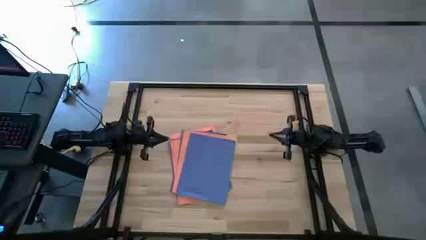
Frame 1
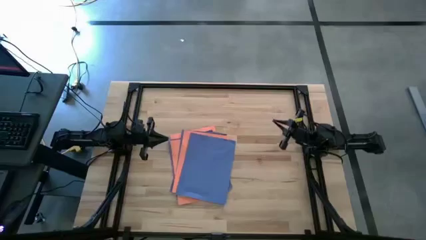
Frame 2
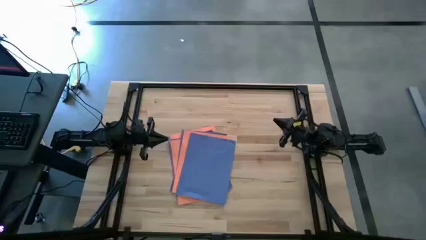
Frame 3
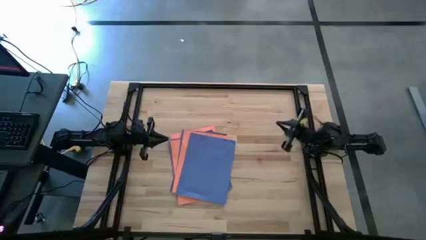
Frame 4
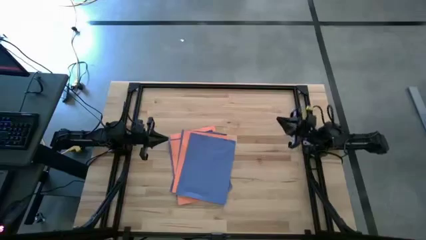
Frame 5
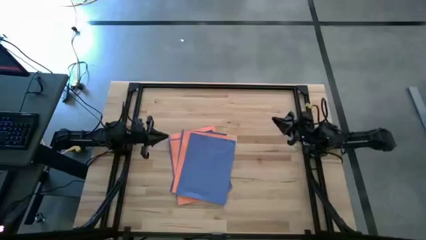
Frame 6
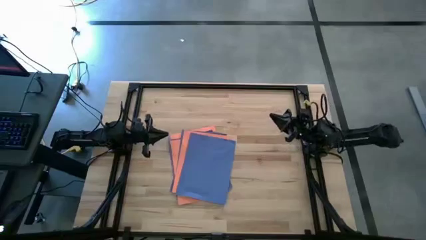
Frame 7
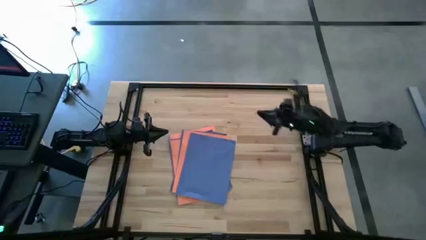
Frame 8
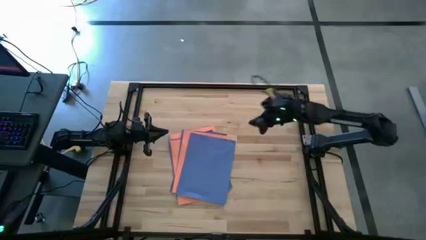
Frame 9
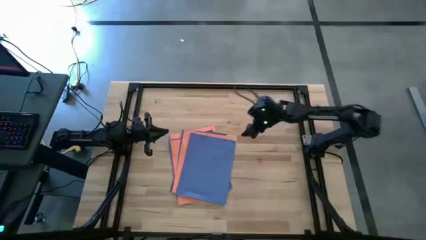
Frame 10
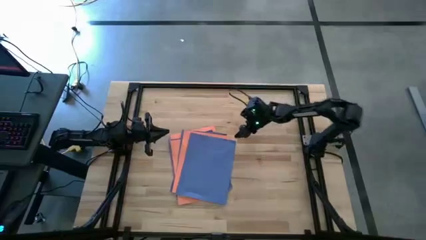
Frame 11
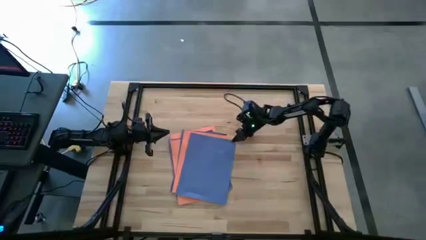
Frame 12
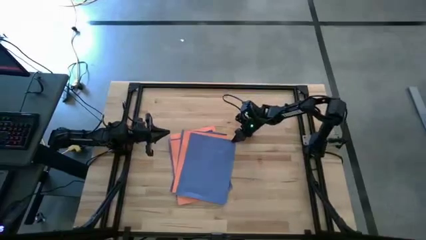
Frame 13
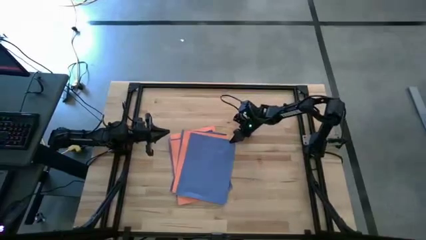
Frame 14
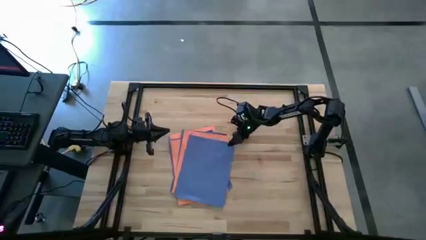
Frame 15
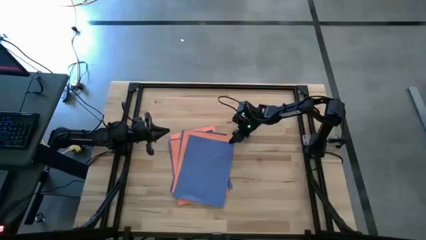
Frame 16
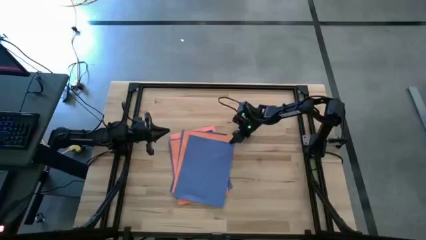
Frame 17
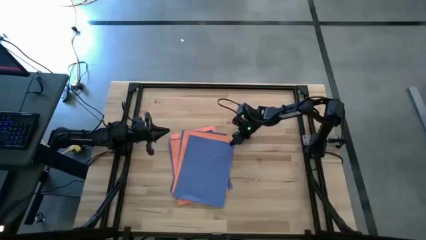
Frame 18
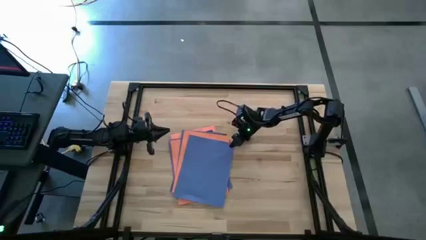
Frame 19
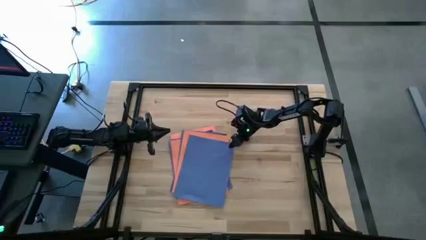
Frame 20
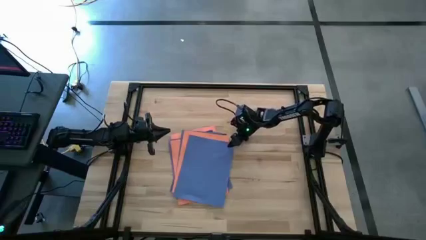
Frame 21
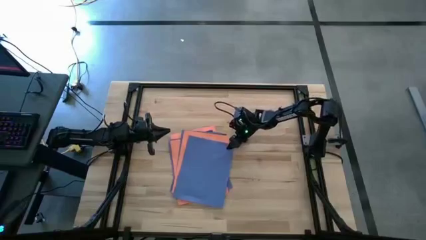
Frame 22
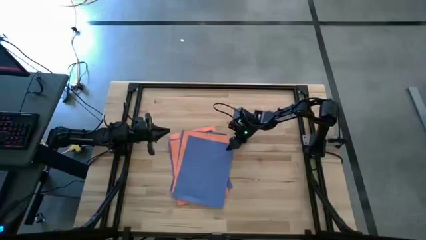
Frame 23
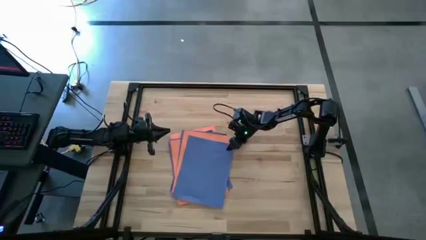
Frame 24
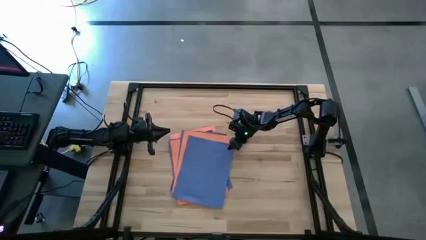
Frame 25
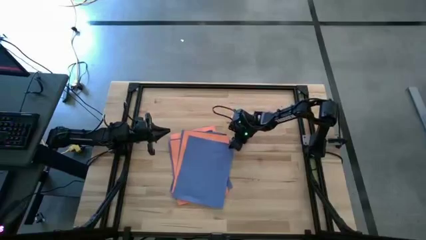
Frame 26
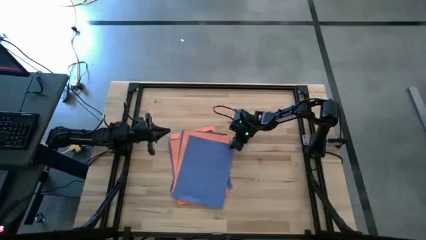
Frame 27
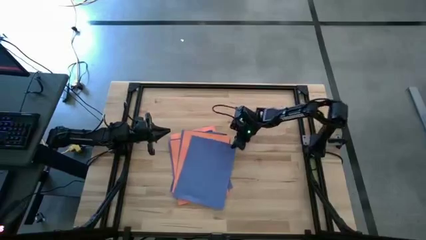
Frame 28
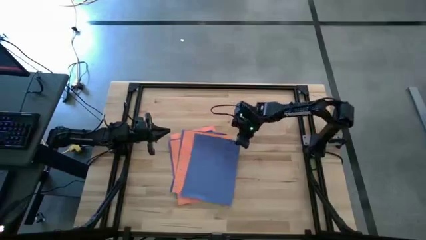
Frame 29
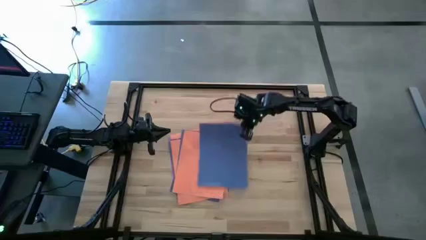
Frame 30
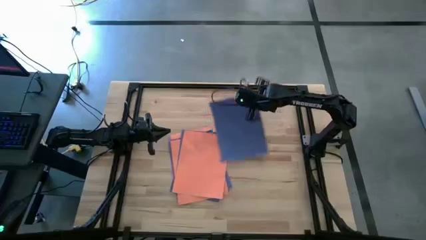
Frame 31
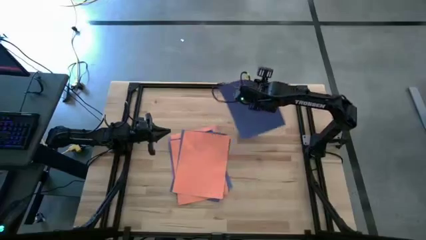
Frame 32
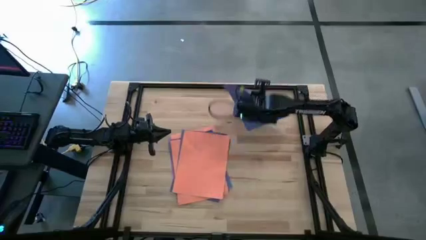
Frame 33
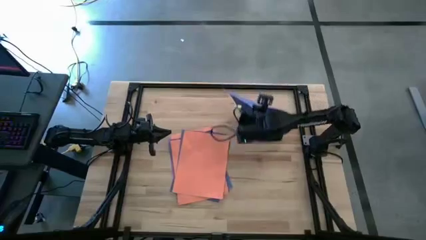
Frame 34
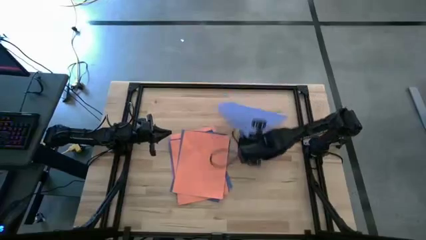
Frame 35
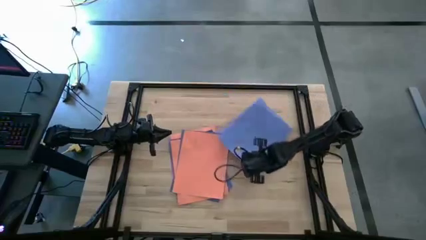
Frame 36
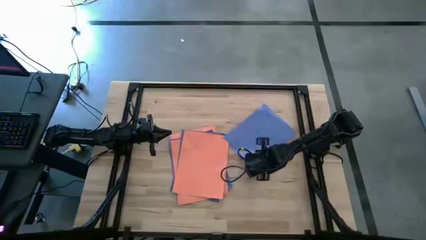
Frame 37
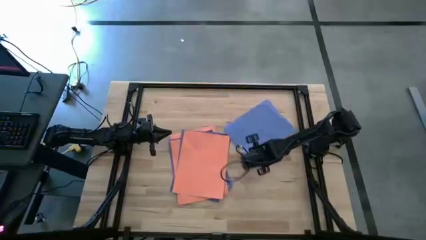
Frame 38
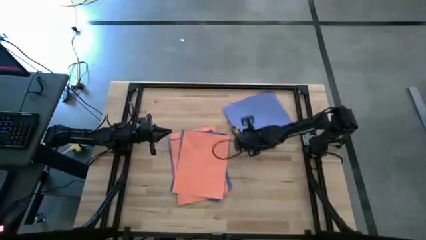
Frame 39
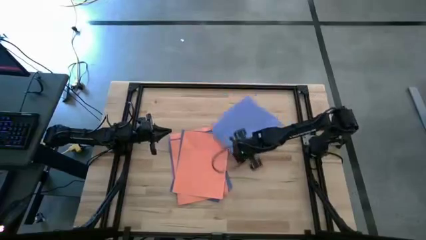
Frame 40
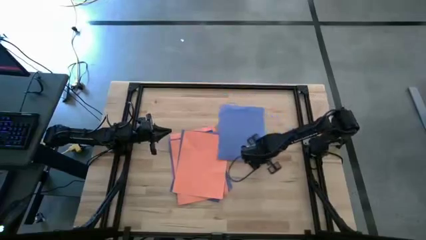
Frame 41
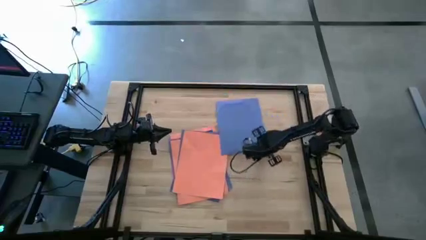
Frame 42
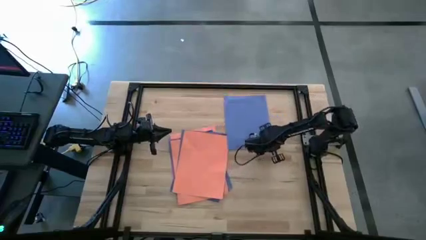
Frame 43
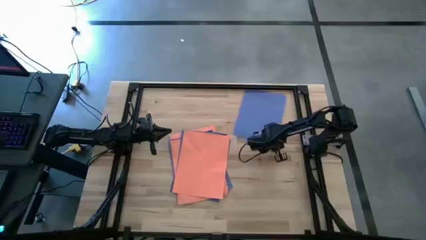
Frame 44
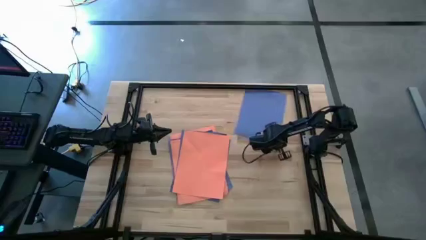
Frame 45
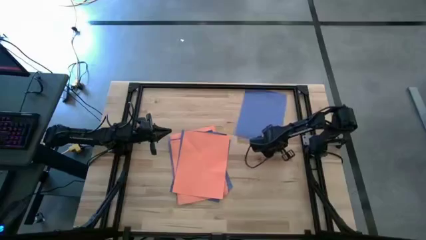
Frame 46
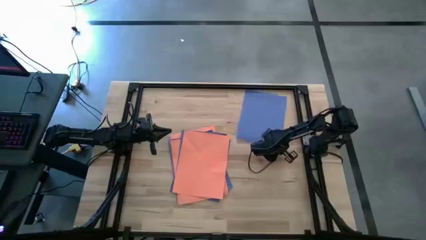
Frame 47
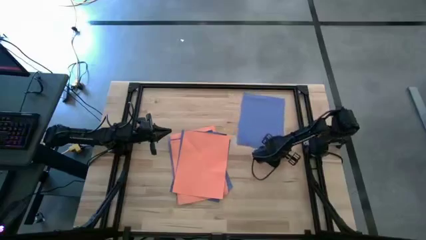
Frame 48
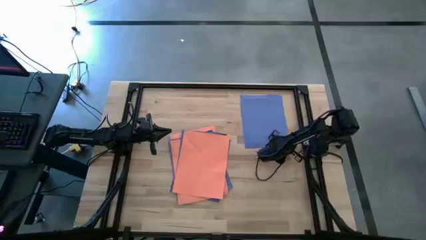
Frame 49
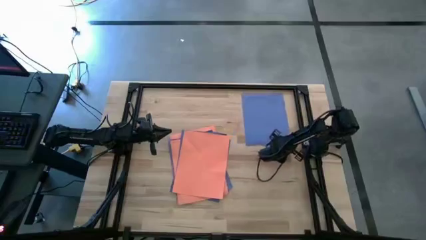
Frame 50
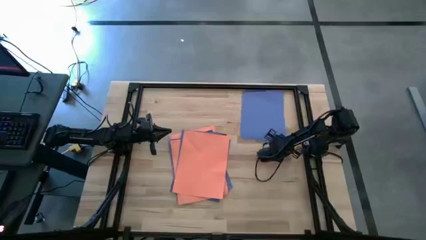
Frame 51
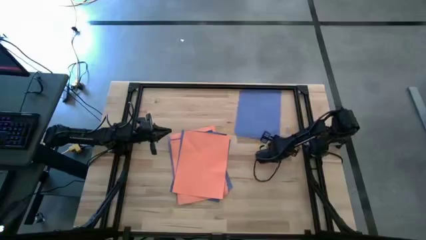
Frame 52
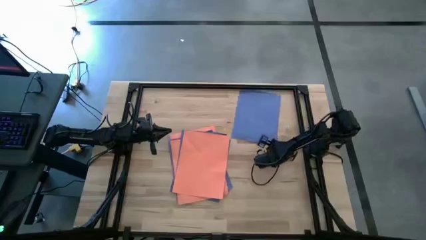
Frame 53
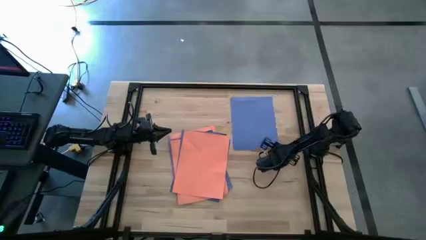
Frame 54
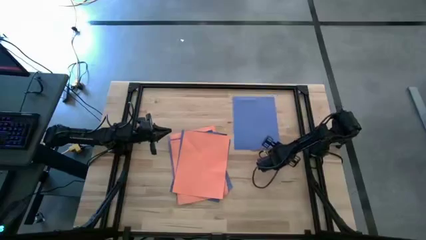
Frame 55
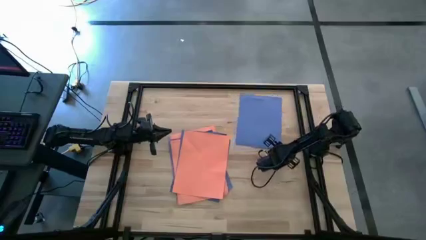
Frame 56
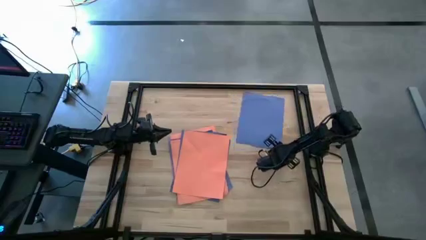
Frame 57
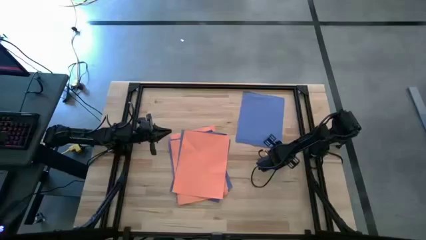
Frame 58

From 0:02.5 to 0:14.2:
Task: Organize paper
Put the blue paper to the top right of the table

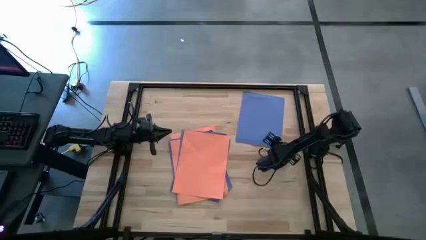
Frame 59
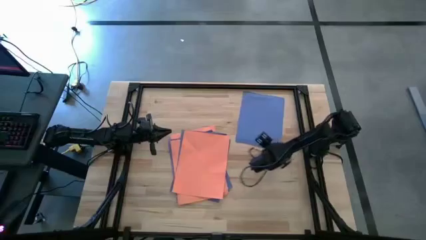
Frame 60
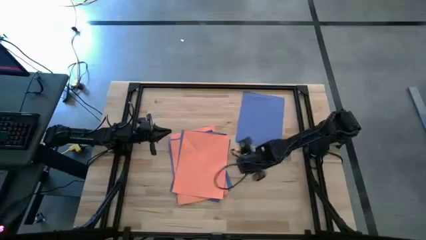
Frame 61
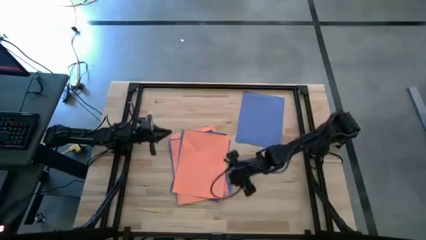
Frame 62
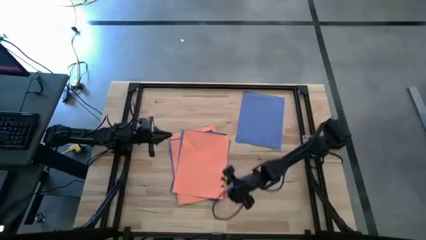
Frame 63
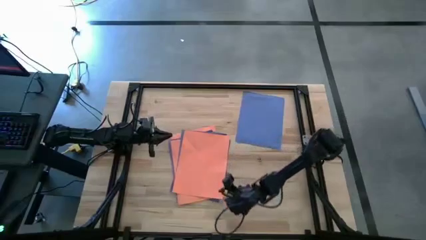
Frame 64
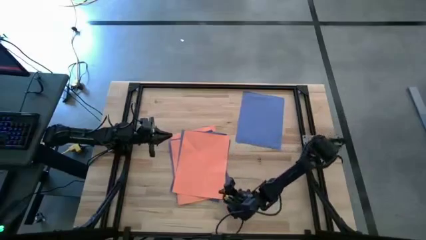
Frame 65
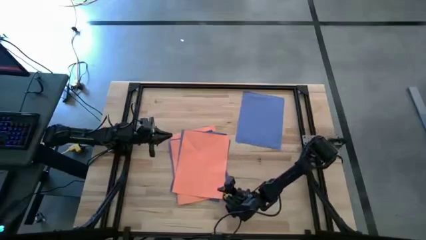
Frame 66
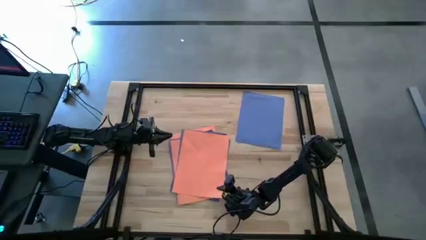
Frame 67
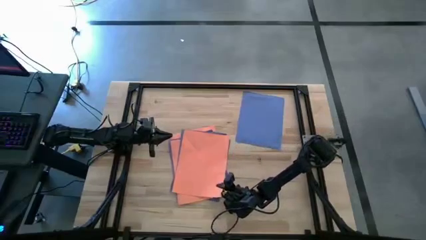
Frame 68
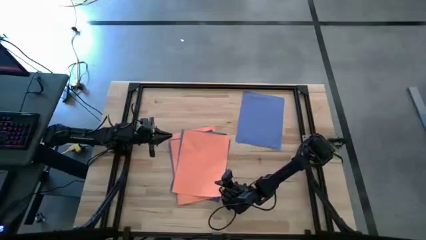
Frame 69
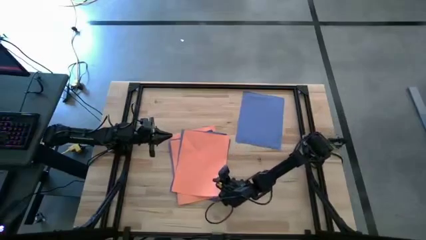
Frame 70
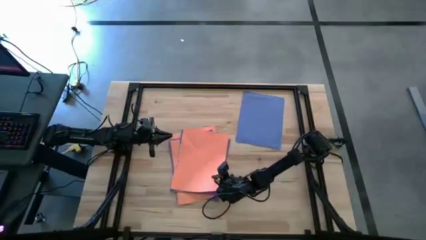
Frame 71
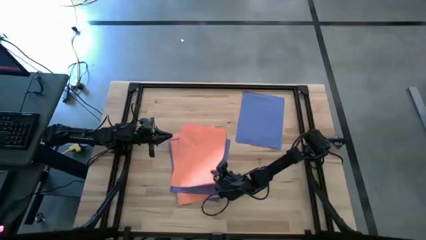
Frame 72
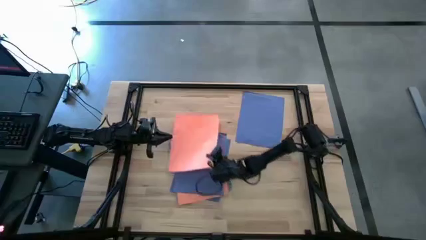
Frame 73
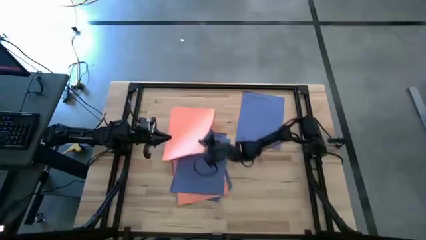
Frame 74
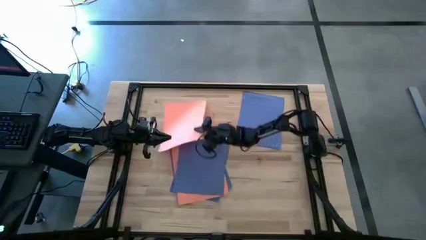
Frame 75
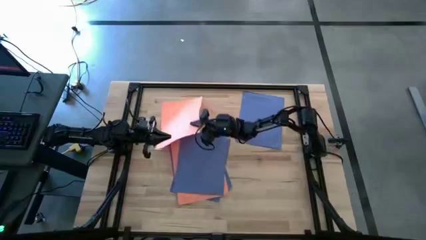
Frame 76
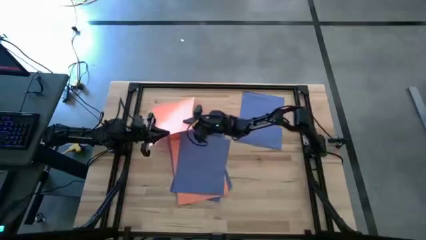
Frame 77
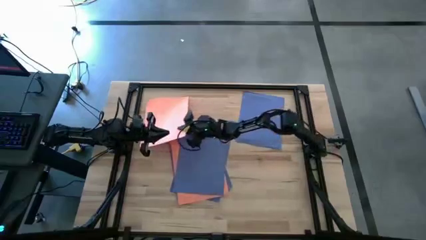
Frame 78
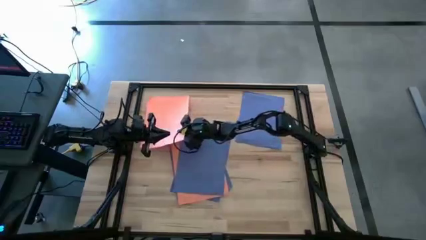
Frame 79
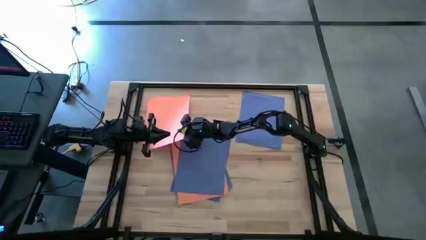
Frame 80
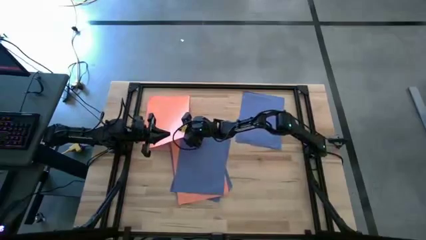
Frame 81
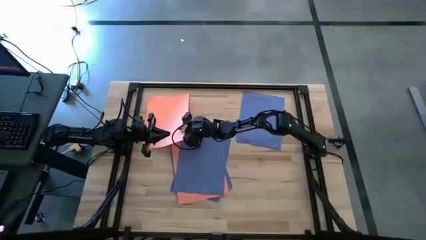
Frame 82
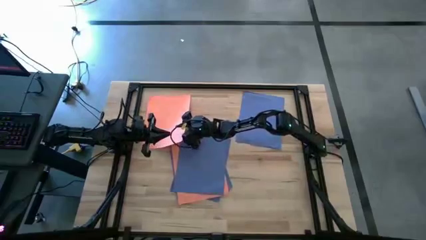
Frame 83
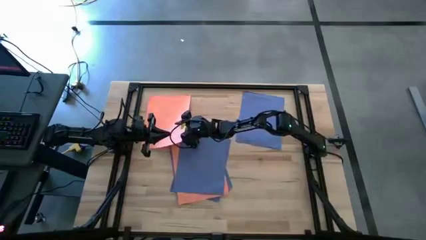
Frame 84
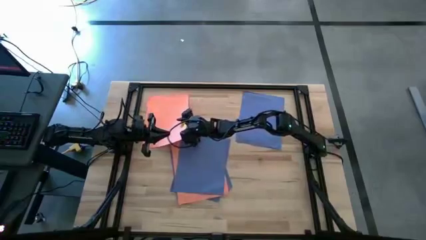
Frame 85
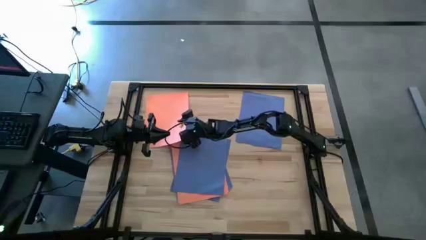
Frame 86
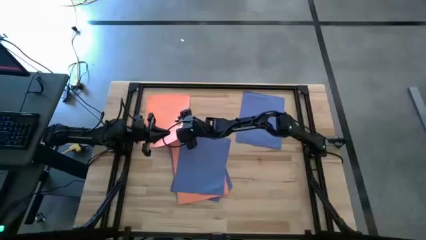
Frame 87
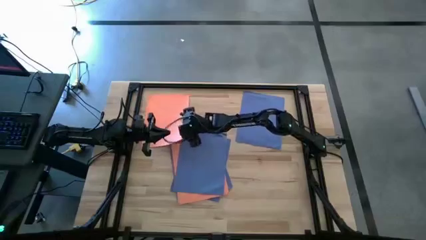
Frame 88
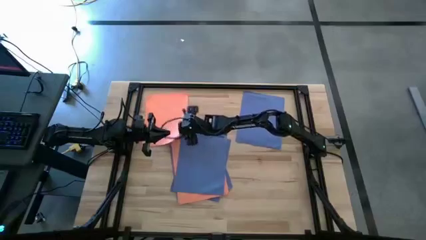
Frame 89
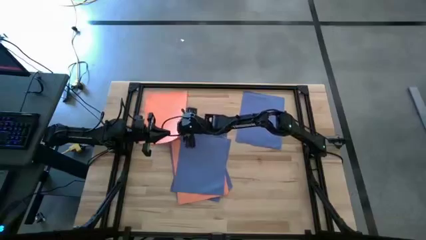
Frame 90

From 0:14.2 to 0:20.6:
Put the orange paper to the top left of the table
